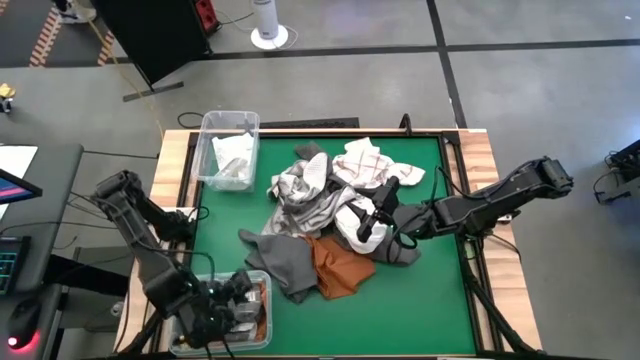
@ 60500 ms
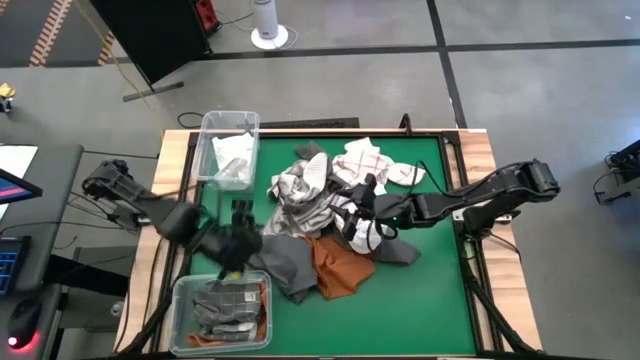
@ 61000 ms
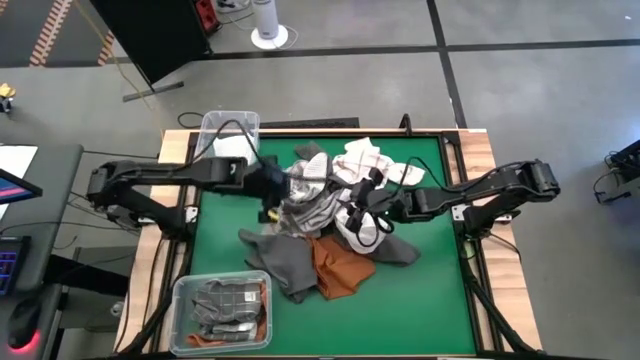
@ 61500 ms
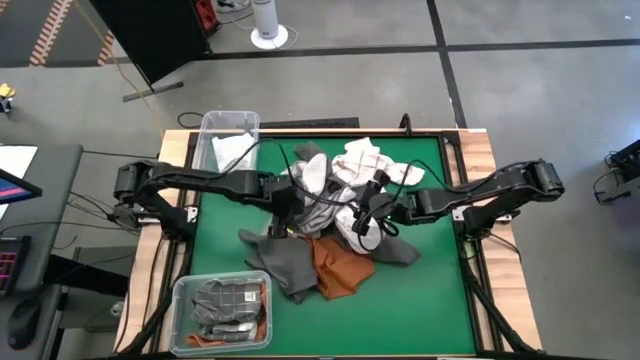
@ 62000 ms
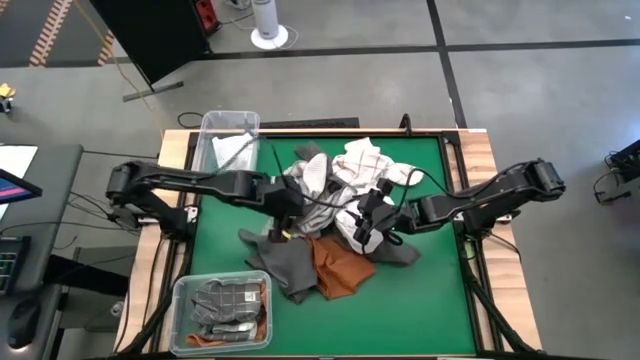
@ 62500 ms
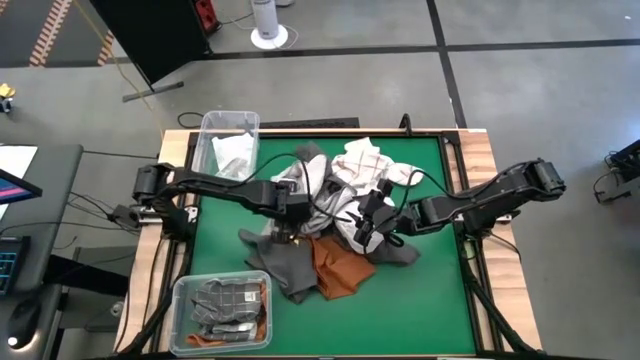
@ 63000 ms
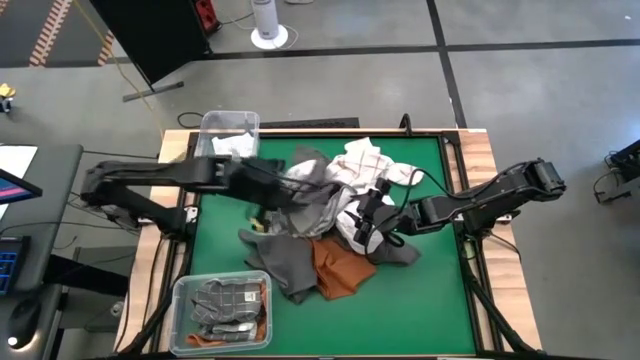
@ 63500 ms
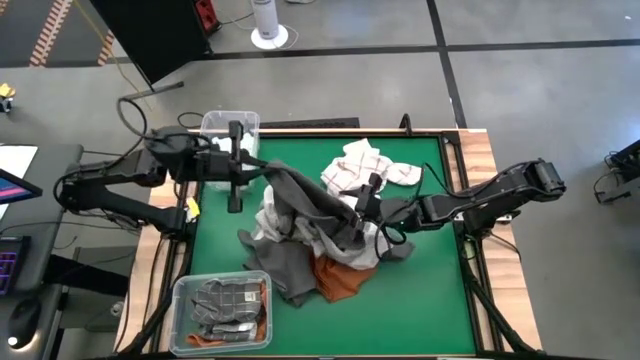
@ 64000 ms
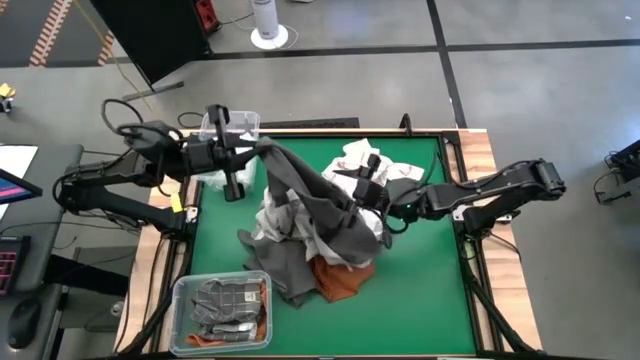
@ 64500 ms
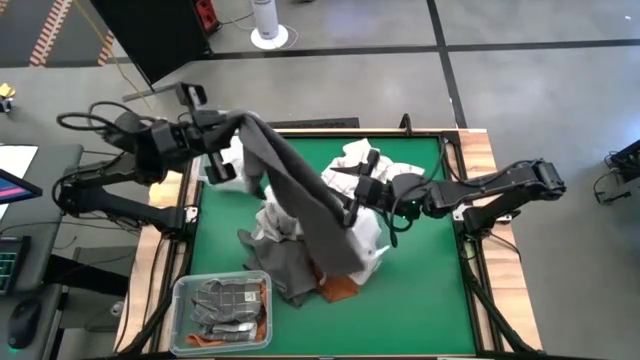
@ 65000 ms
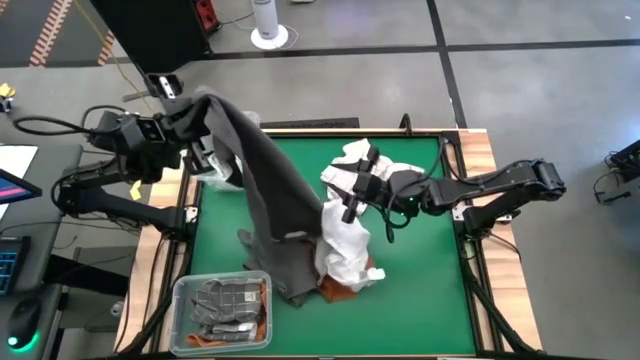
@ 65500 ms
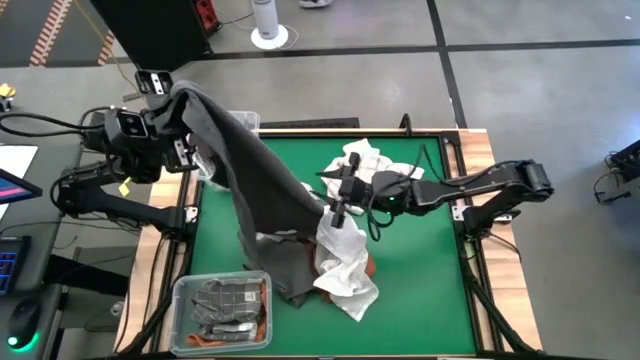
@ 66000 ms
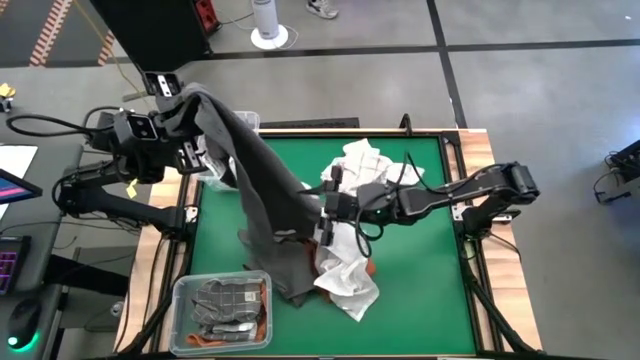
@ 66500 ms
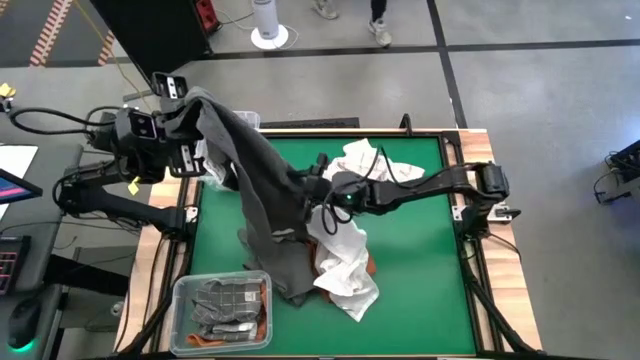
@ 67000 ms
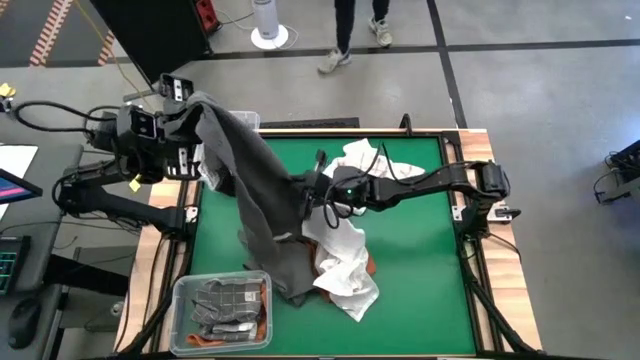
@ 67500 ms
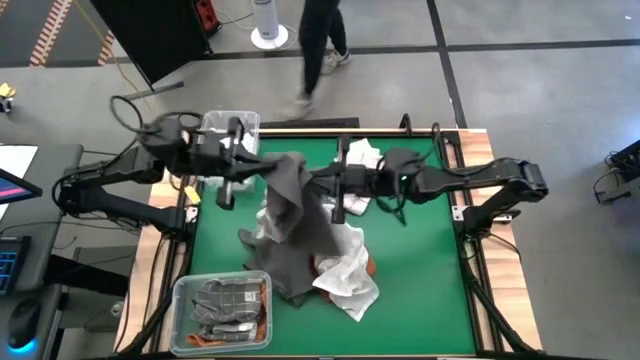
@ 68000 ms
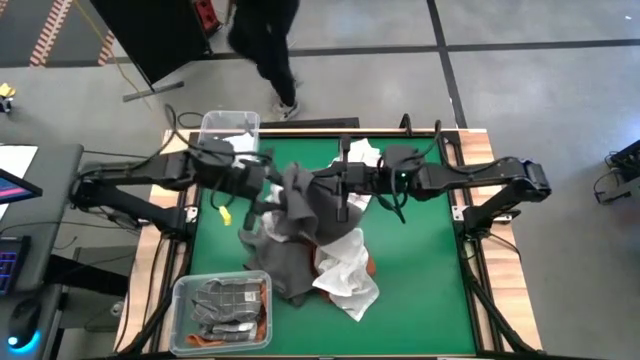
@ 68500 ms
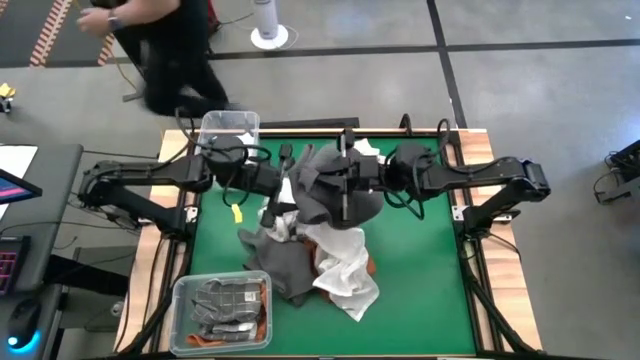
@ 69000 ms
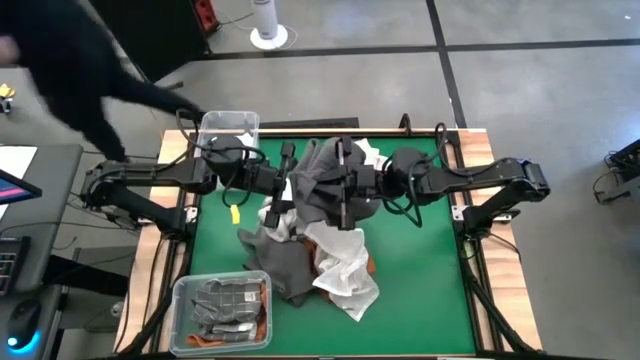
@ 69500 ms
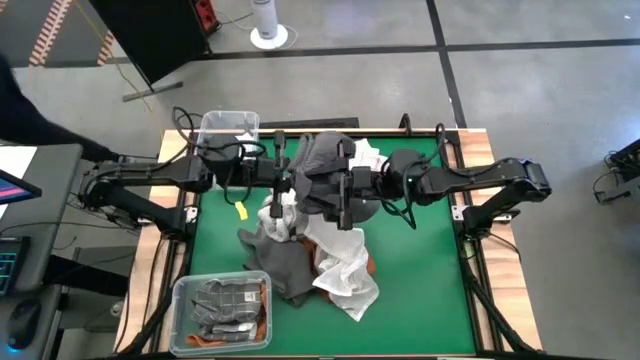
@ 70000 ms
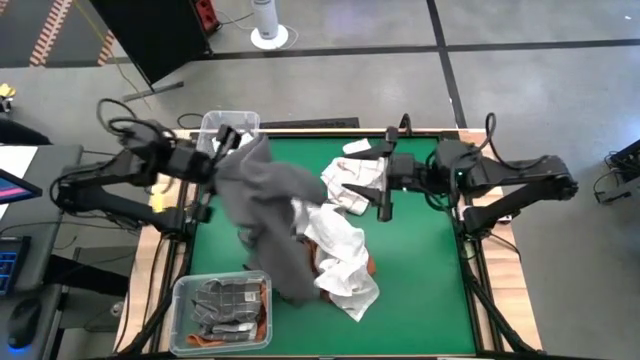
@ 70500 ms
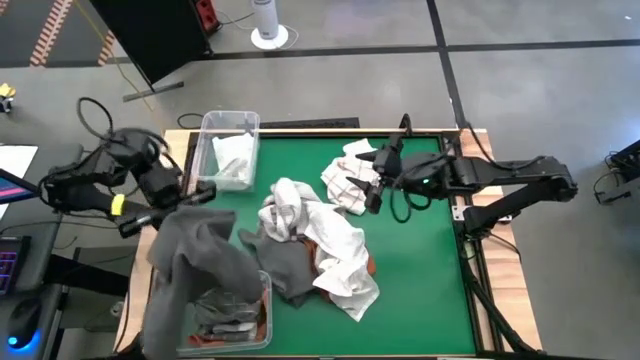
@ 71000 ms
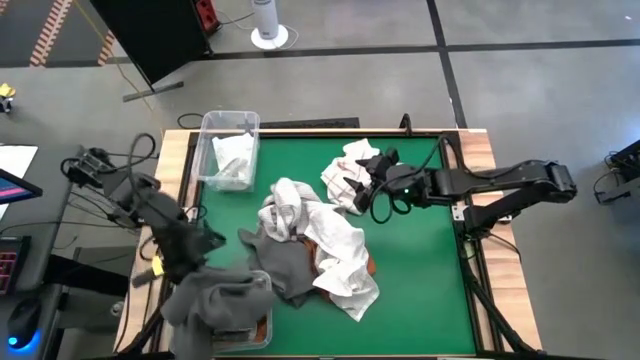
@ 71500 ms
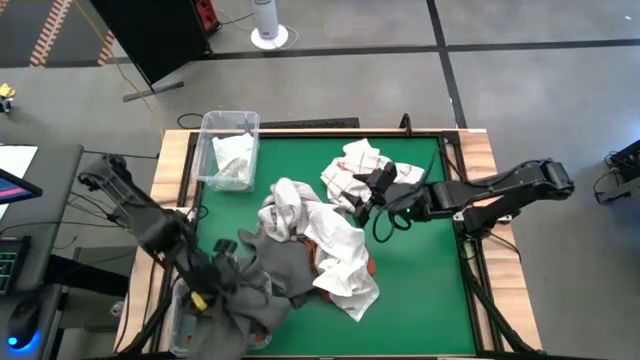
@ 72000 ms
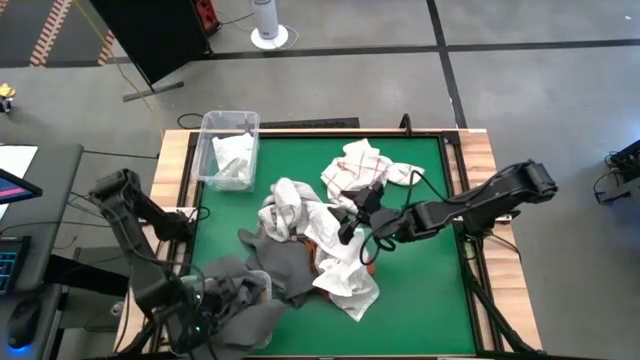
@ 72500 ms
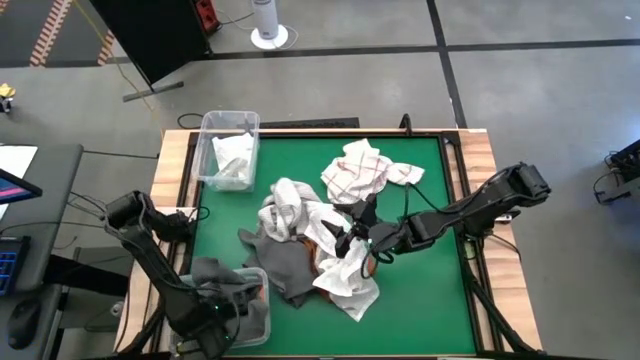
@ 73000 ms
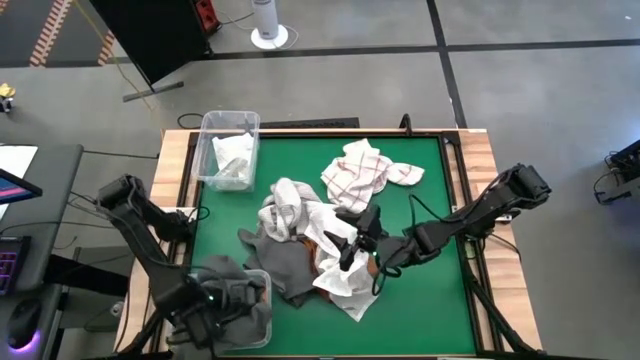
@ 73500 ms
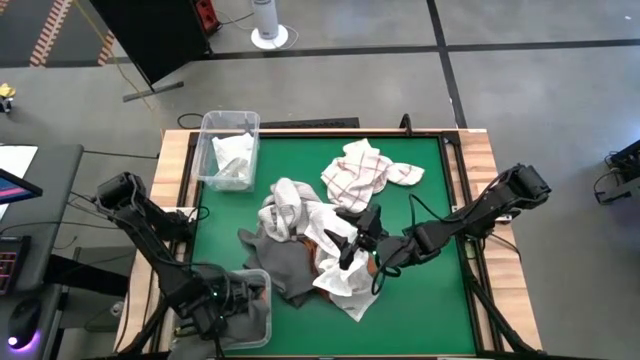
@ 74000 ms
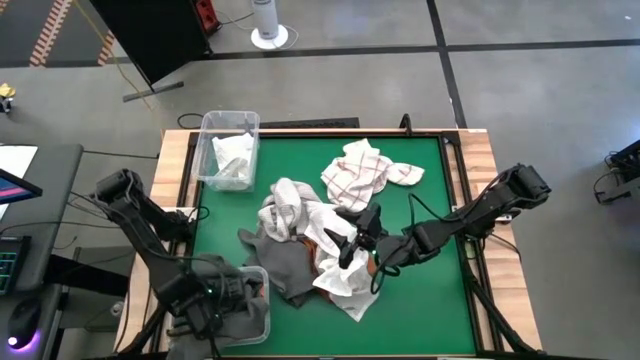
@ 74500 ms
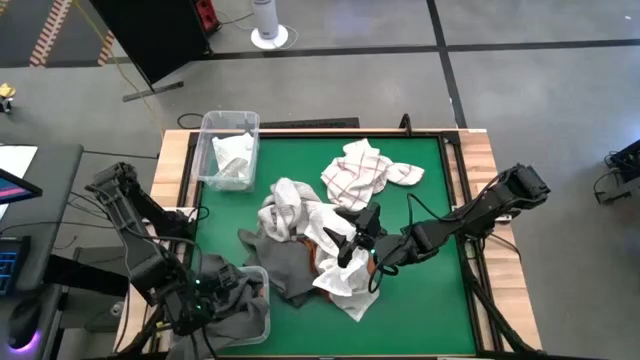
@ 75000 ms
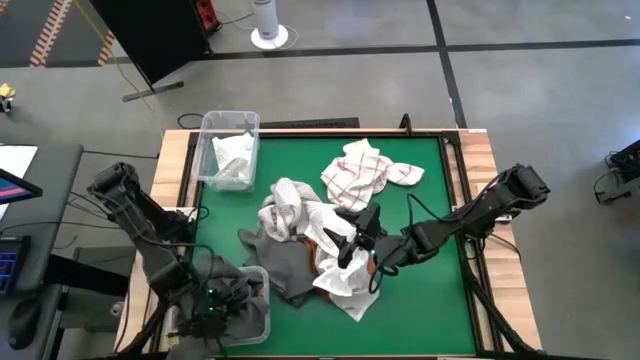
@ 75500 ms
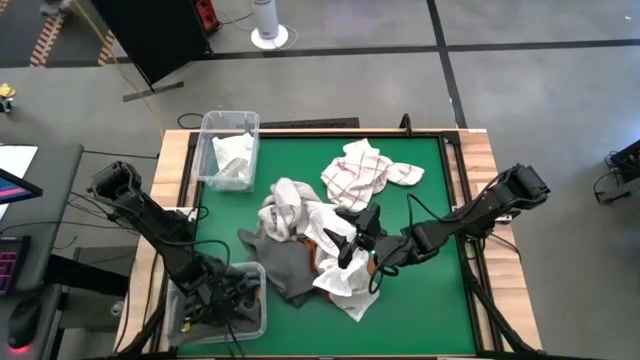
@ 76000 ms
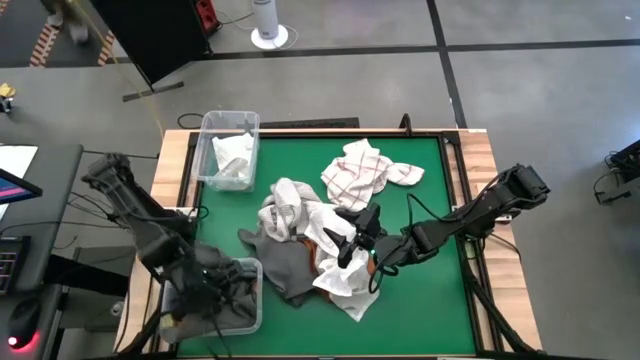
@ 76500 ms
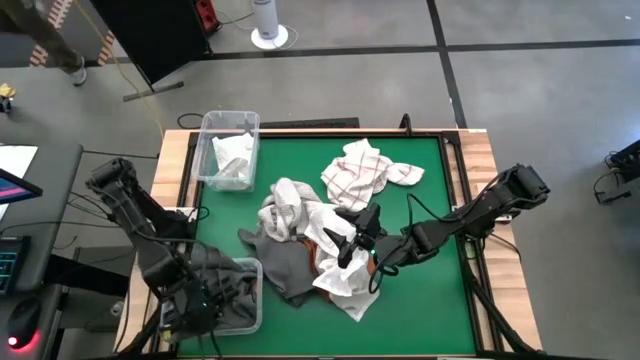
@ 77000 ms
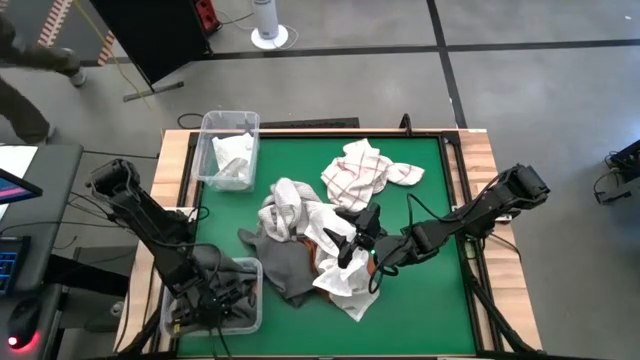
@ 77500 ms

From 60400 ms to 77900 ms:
Task: Sort towels by color in basket
Put the gray towel into the bottom transparent bin

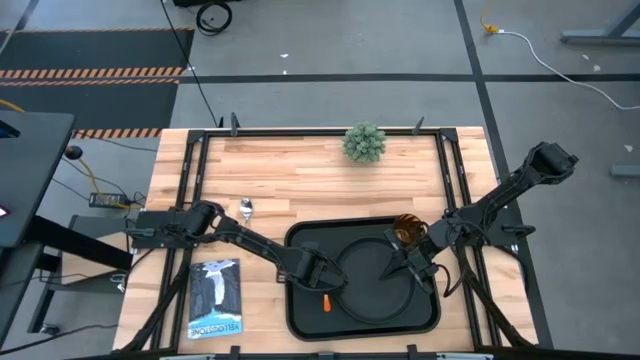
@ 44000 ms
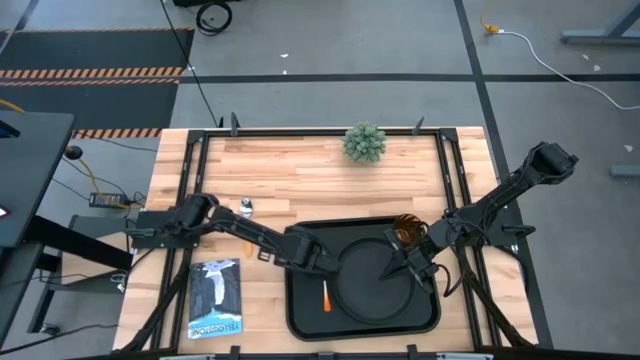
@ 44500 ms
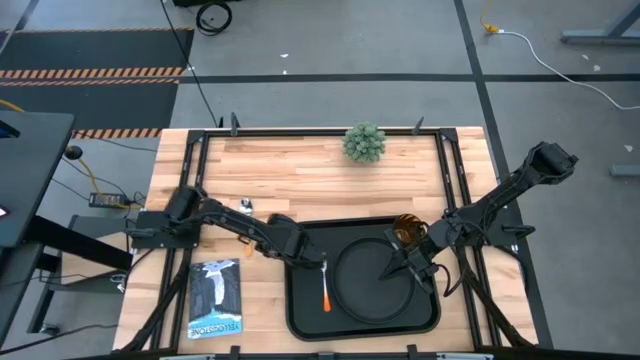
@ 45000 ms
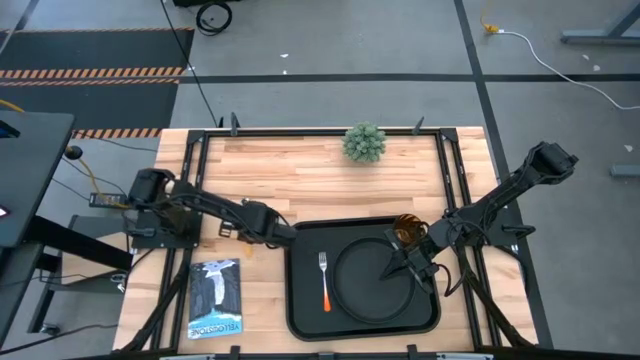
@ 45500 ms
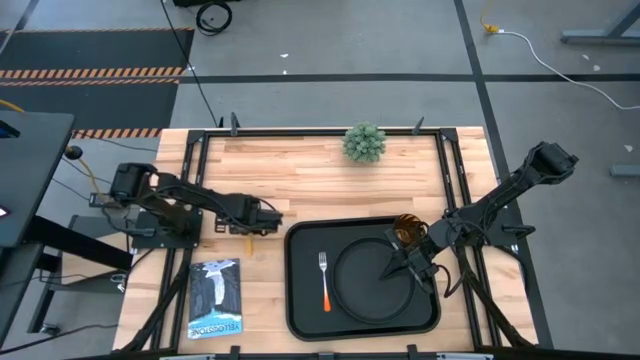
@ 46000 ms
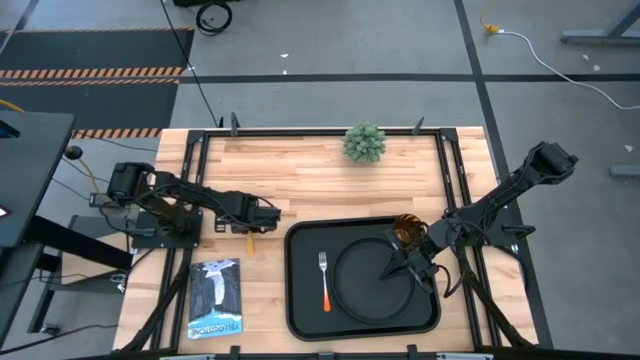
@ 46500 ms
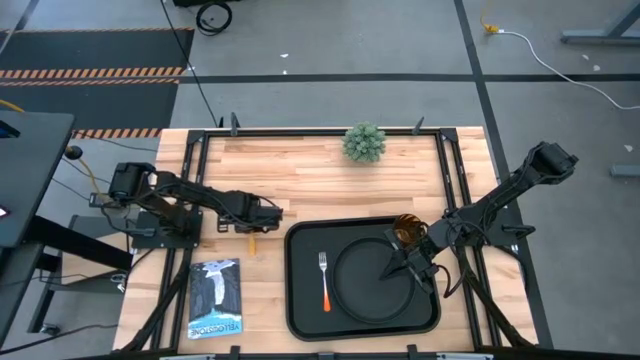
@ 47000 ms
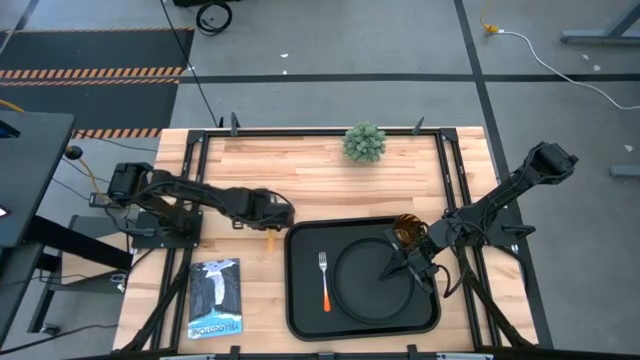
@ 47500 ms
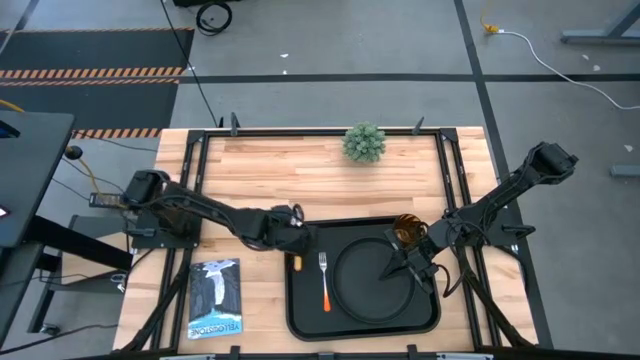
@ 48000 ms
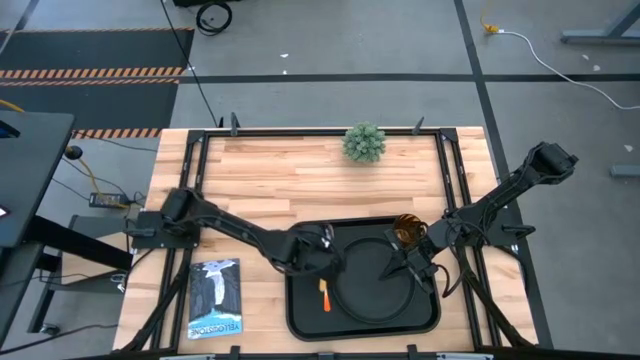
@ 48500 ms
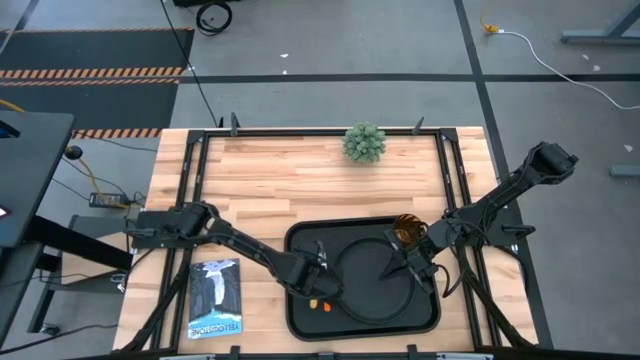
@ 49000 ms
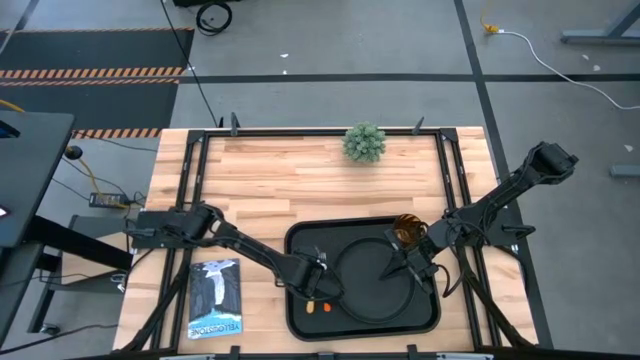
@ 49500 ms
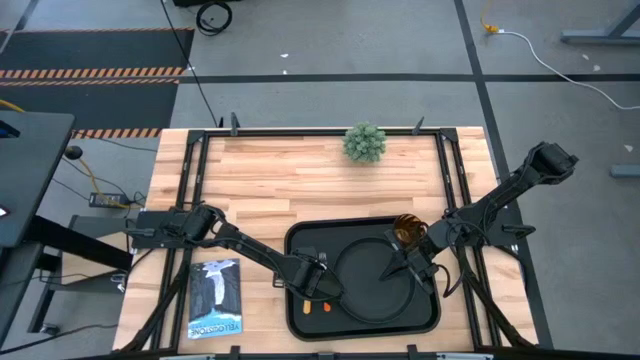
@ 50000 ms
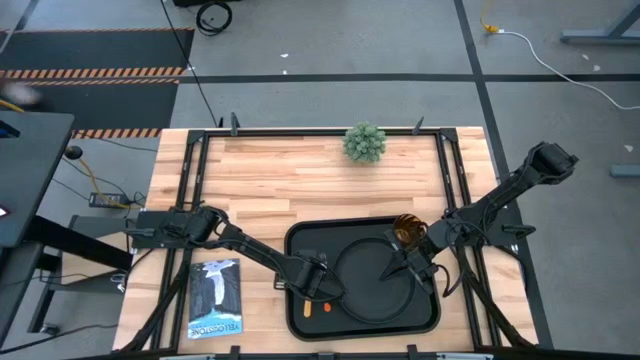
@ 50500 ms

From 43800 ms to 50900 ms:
Task: Pick and place plate/cup/fork/spoon on tray
Put the yellow spoon on the black serving tray to the left of the orange fork
